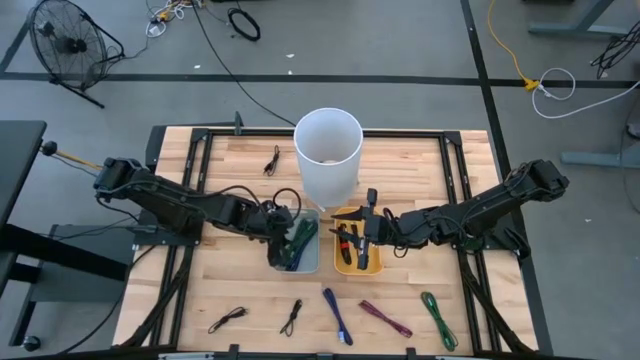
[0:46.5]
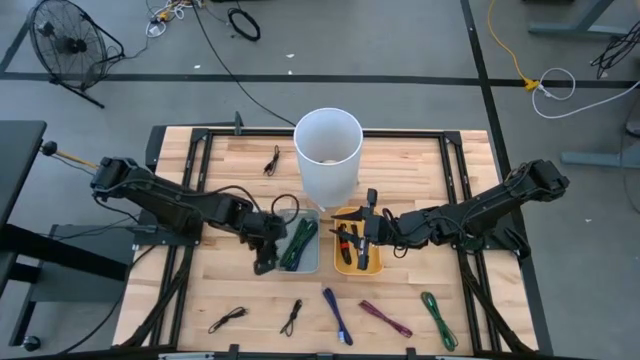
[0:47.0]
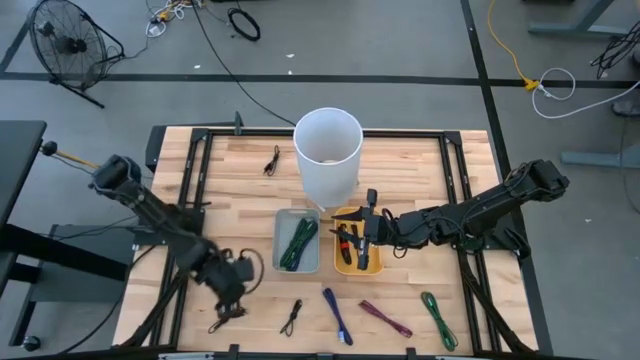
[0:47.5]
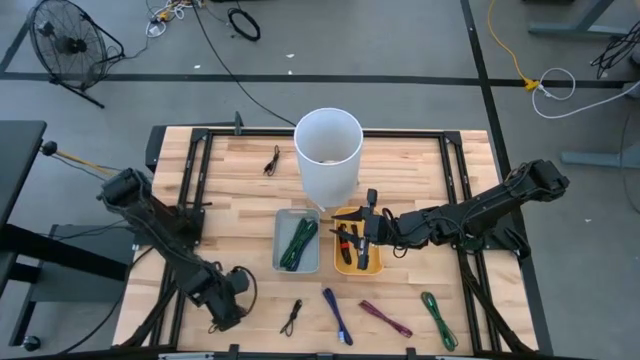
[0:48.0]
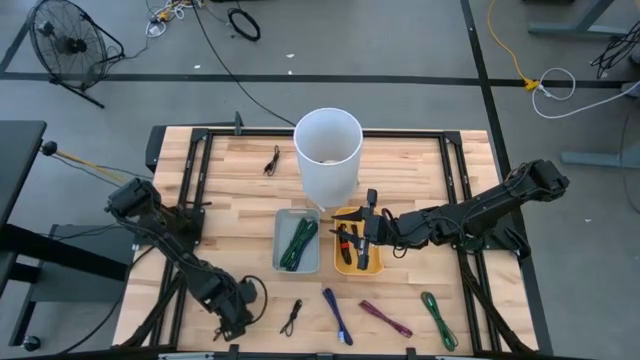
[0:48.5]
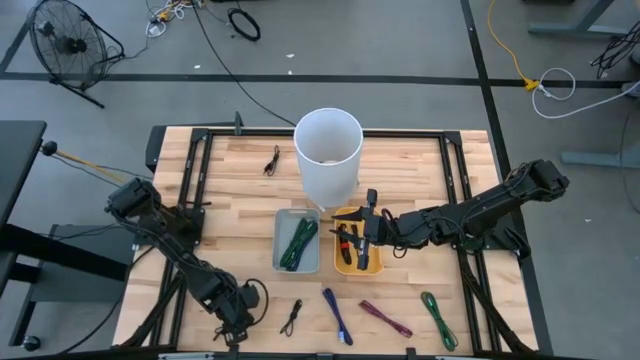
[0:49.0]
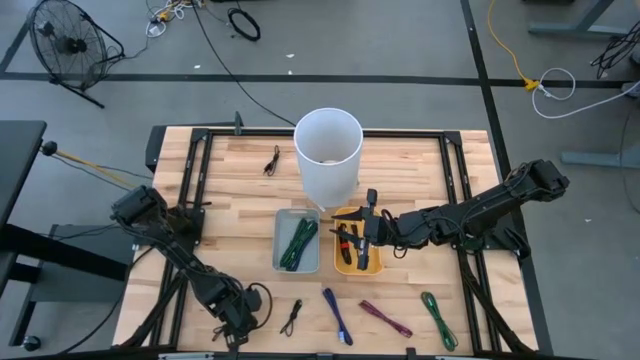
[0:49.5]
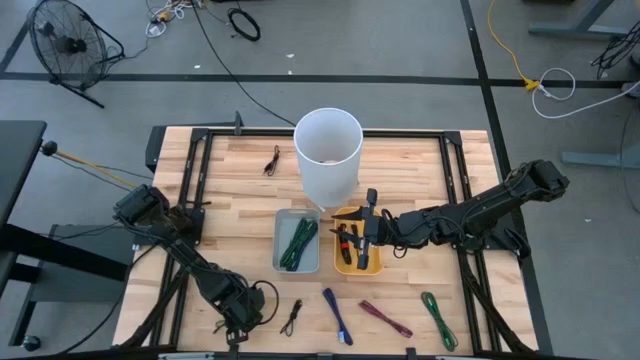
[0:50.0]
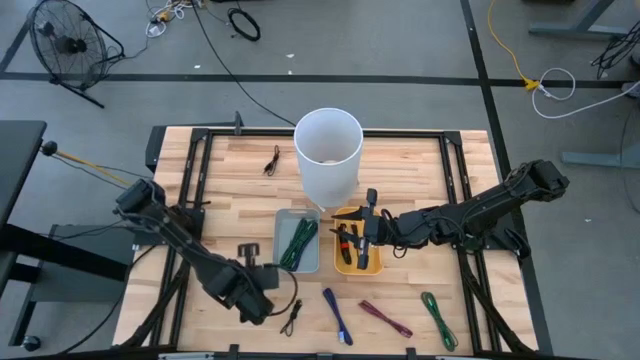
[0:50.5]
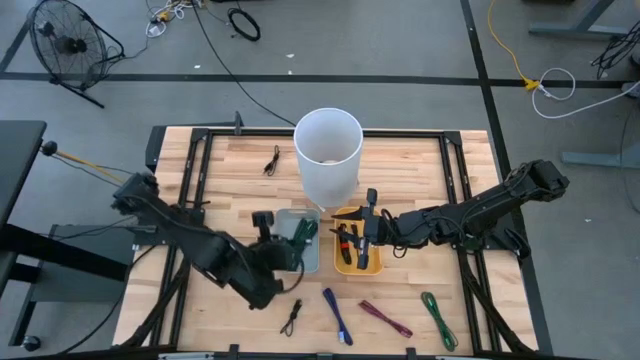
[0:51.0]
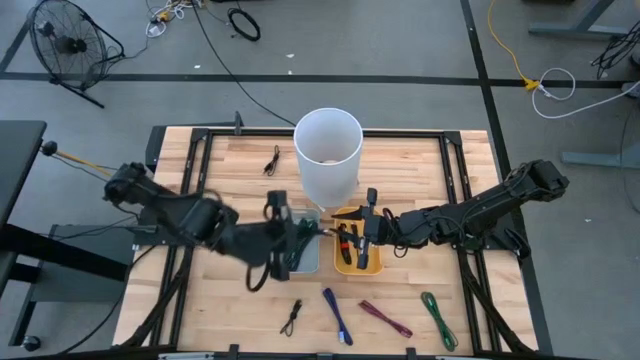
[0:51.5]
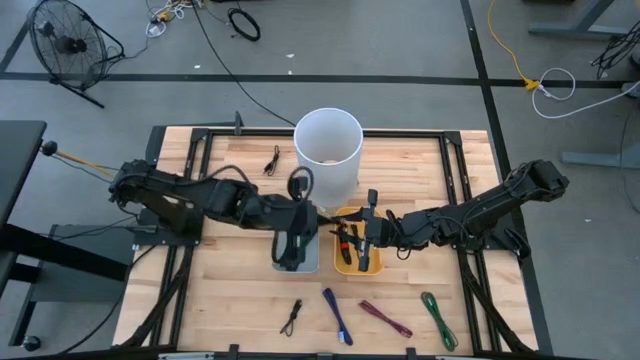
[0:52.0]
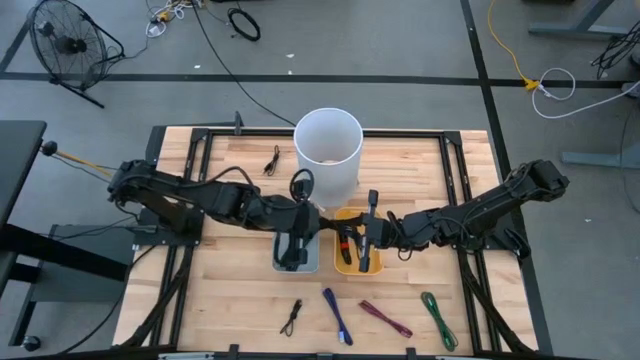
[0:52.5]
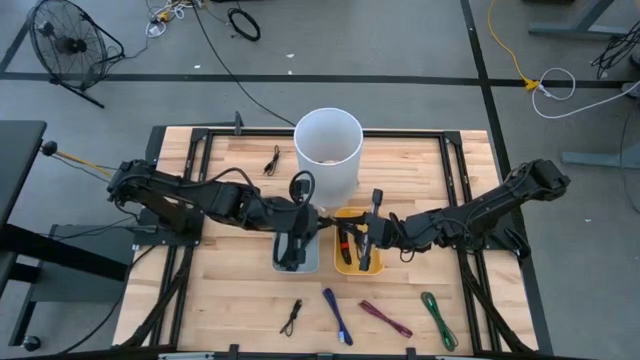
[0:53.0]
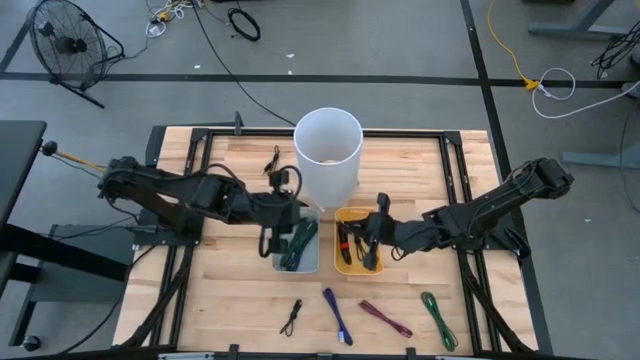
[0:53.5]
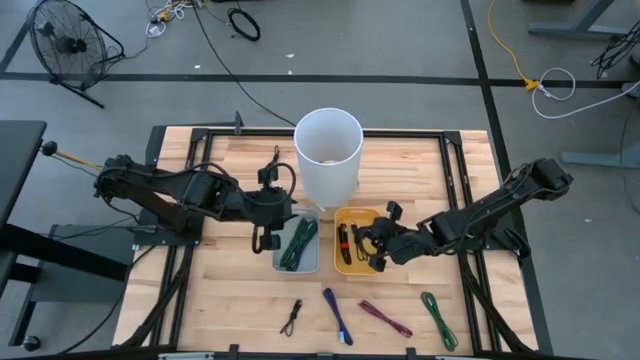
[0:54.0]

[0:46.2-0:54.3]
Task: Pick & Place USB Port
Put the black charger cable into the gray bin

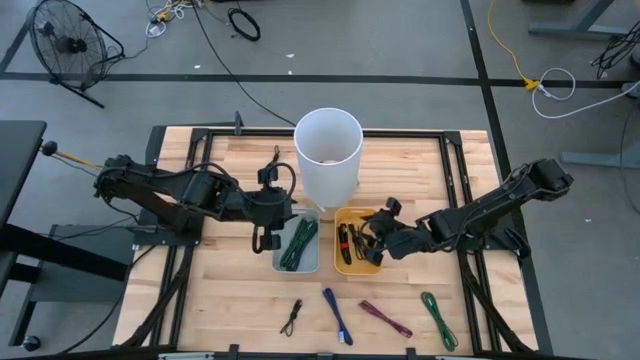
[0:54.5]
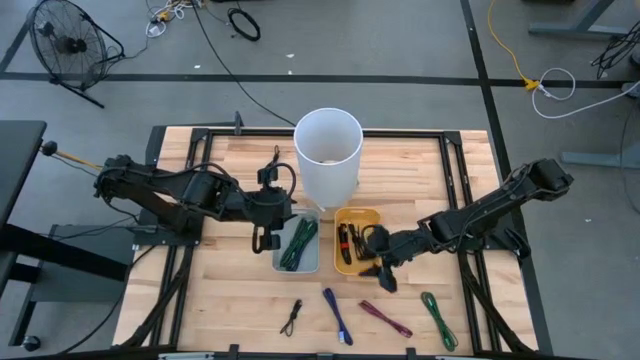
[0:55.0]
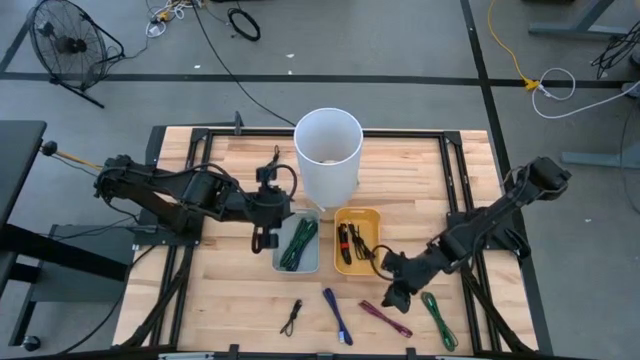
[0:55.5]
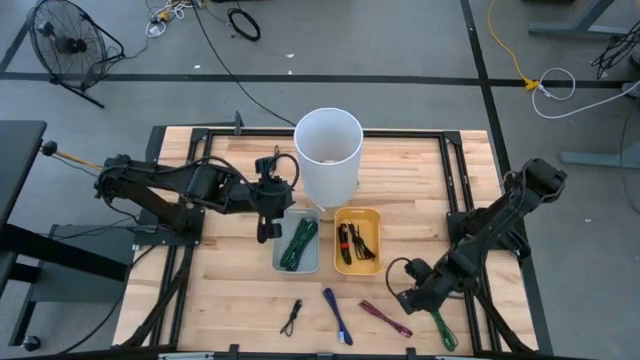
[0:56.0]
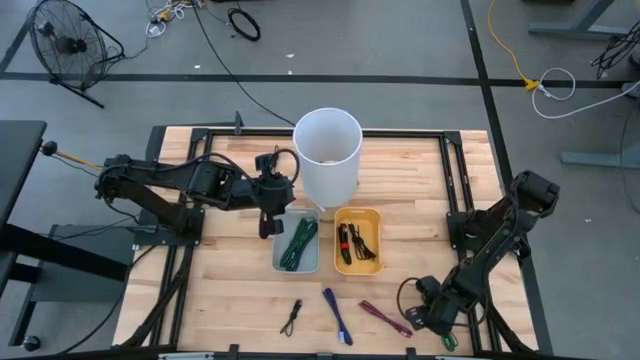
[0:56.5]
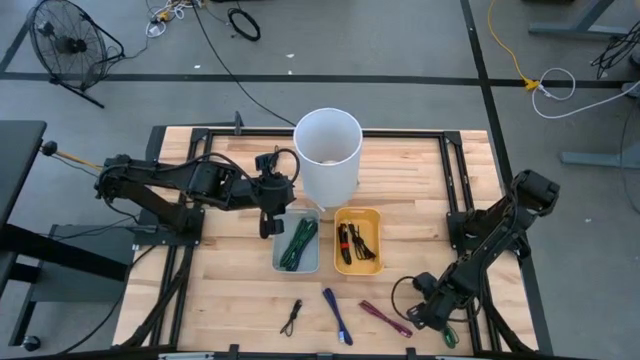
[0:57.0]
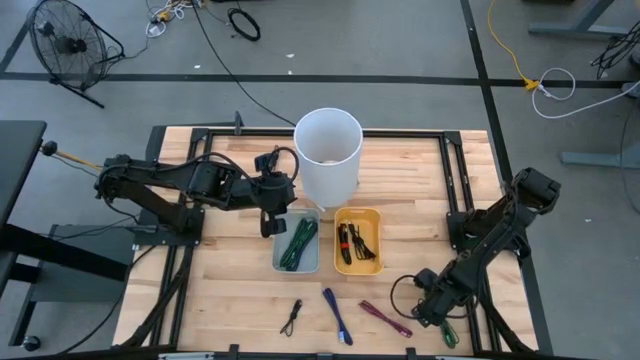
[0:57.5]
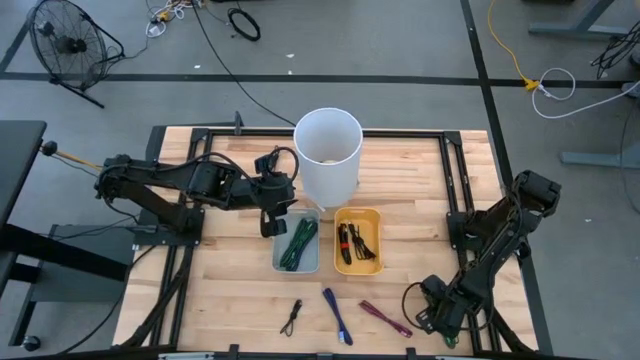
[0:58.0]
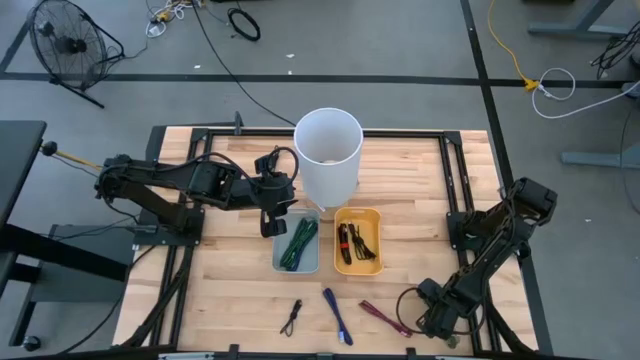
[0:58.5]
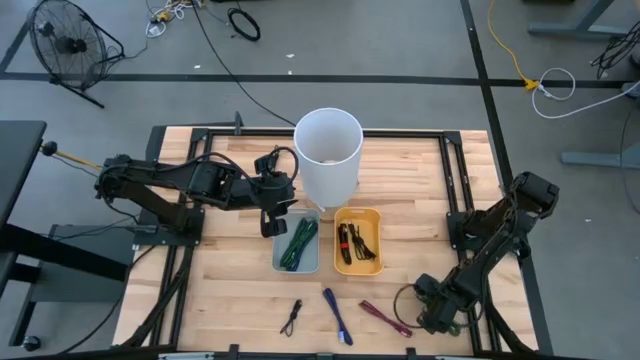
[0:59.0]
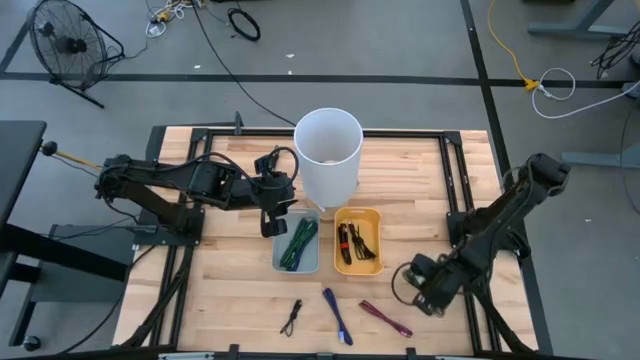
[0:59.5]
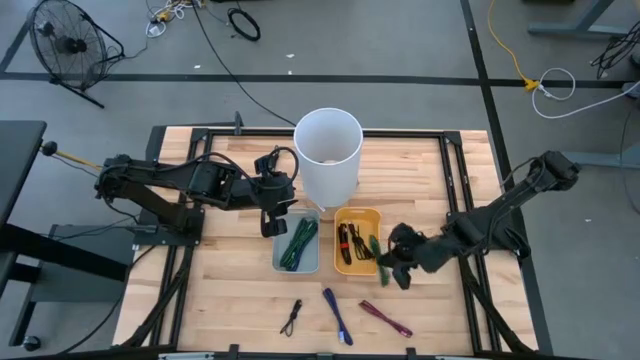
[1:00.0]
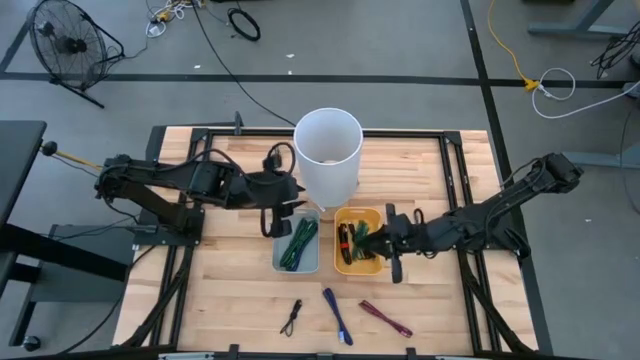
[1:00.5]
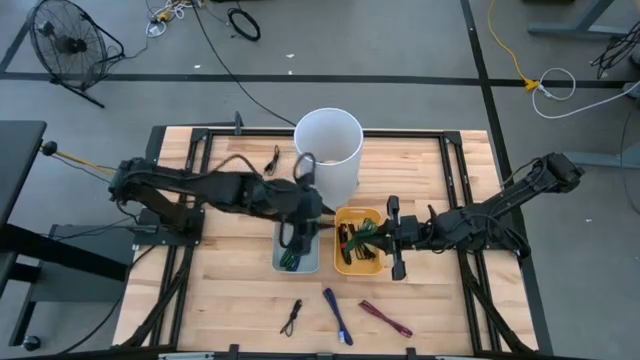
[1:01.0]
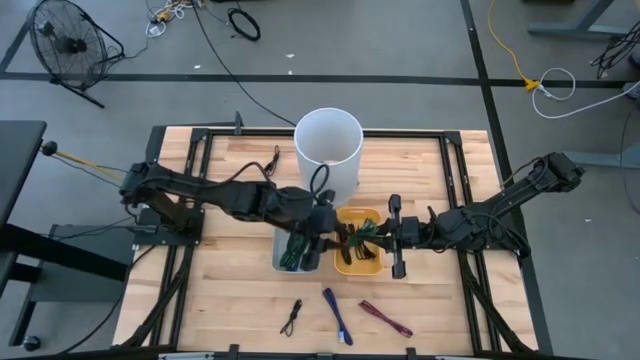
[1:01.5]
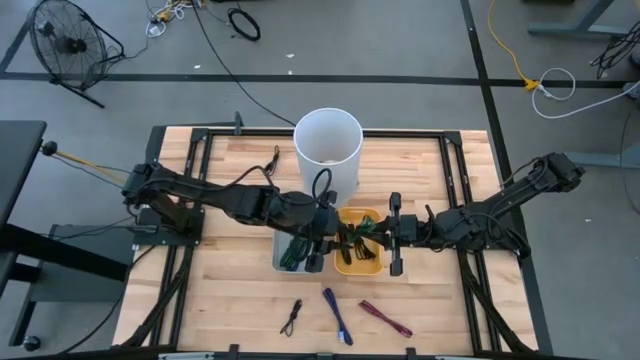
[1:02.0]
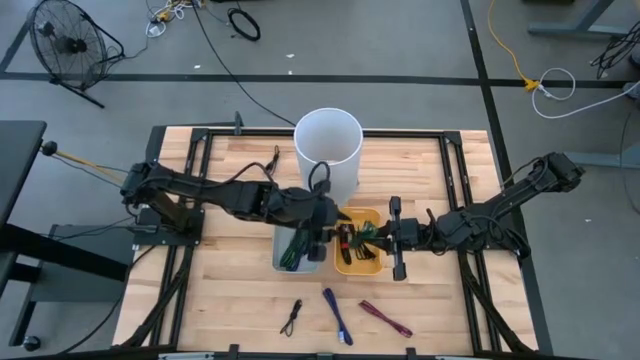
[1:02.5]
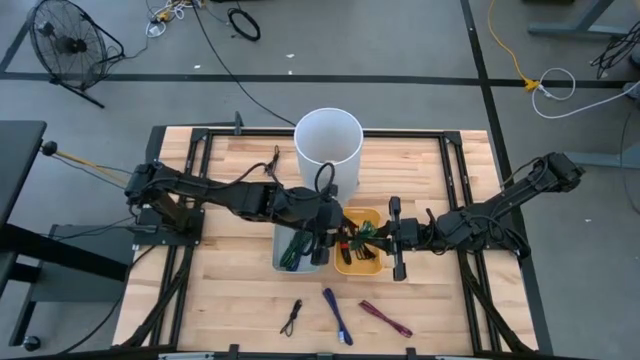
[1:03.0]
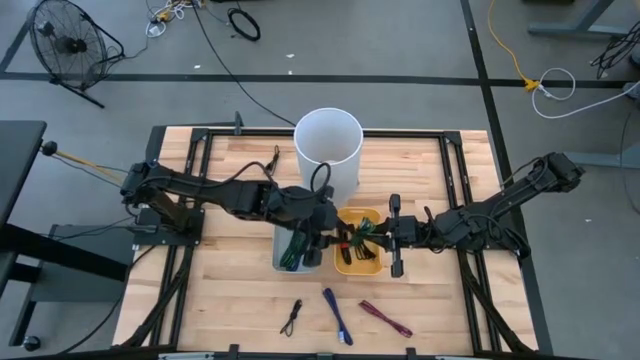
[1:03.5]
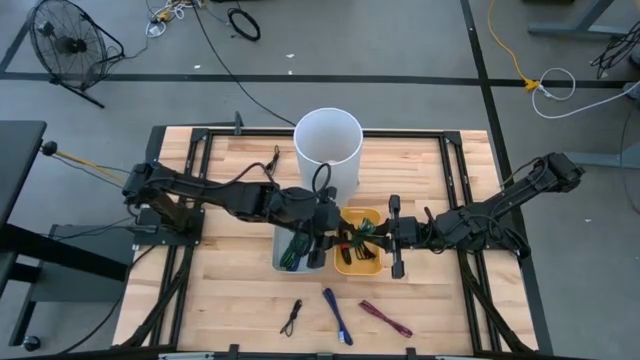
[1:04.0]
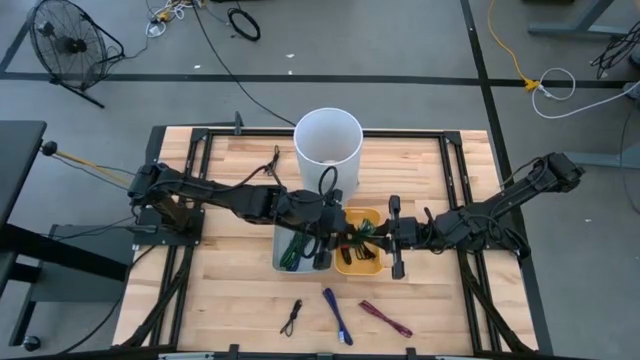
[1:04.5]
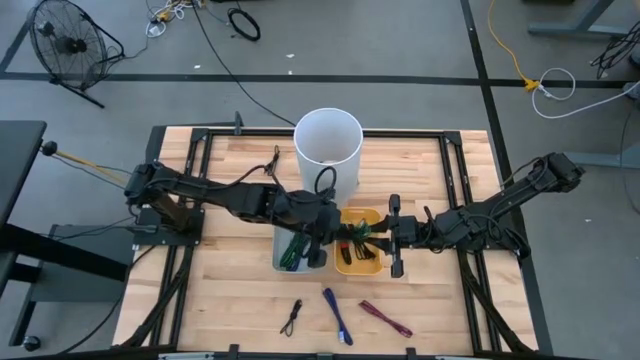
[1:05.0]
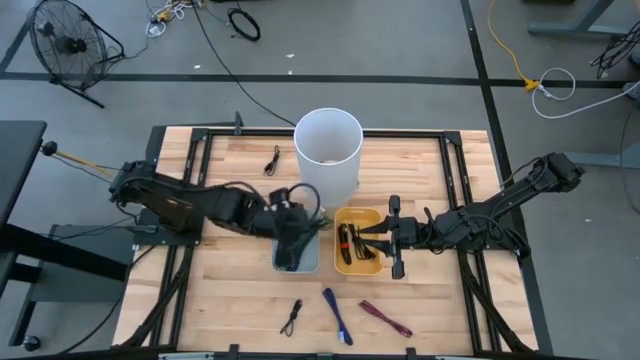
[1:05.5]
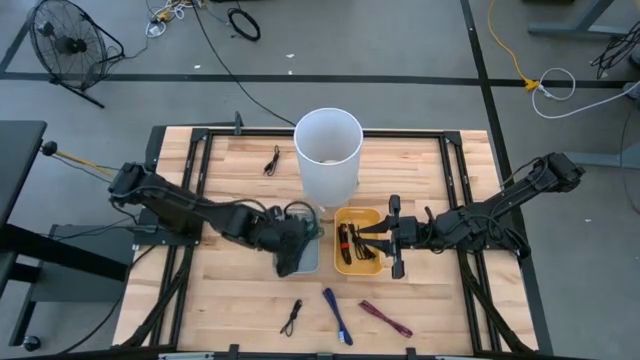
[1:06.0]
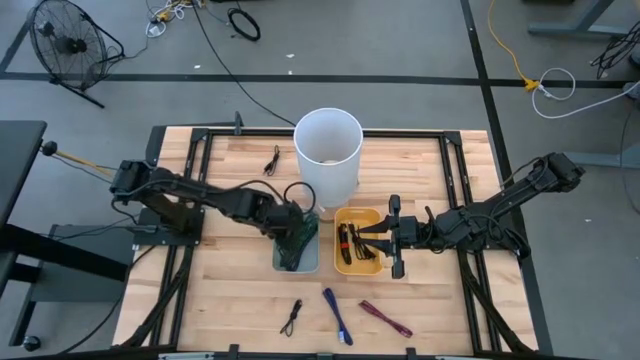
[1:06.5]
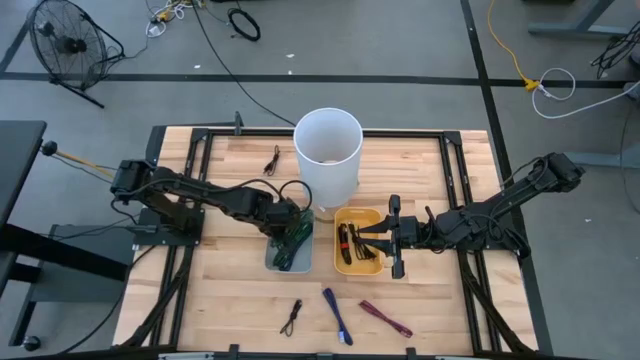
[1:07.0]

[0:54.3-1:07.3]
Put the green charger cable into the gray bin
